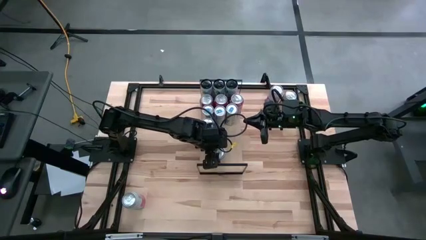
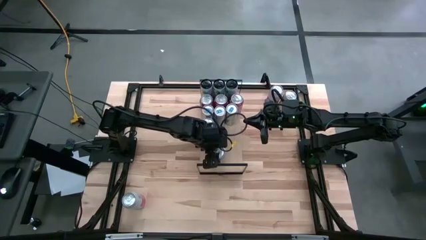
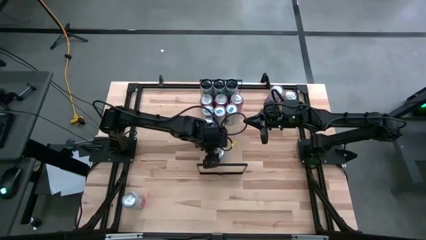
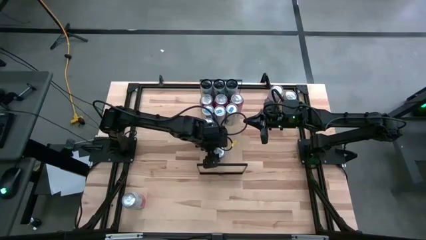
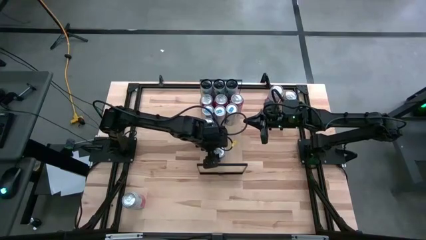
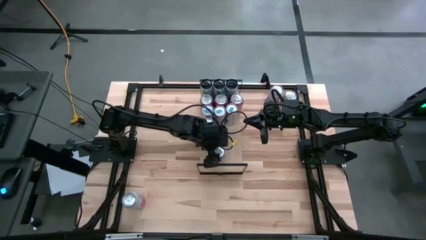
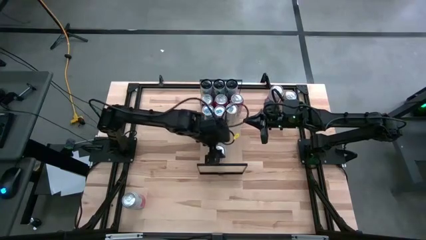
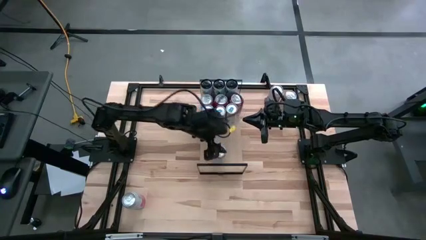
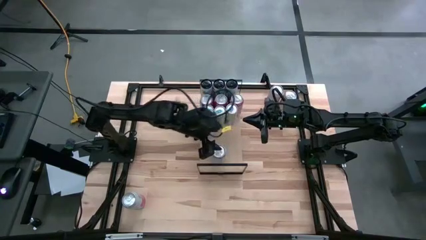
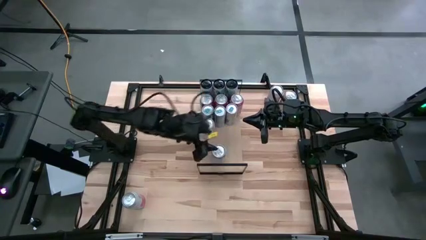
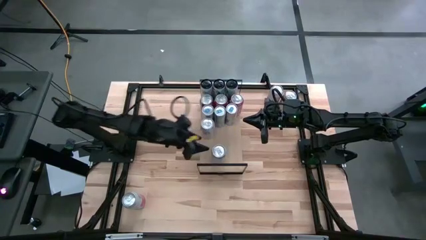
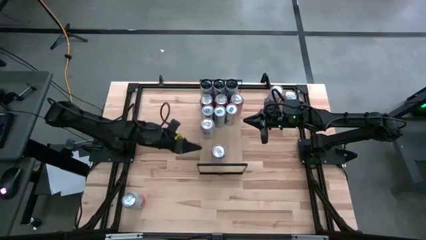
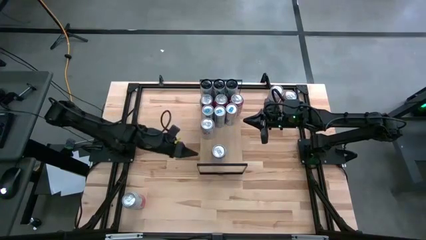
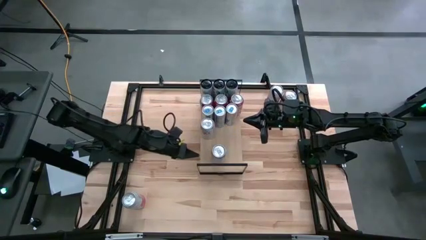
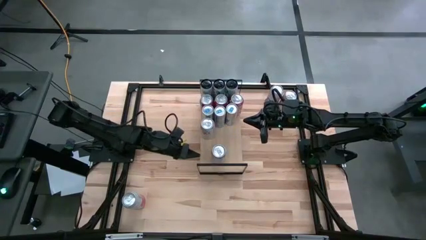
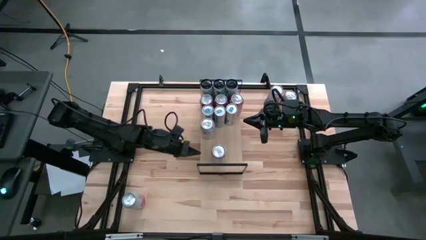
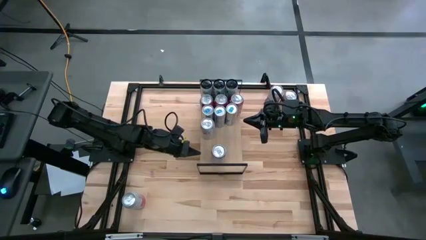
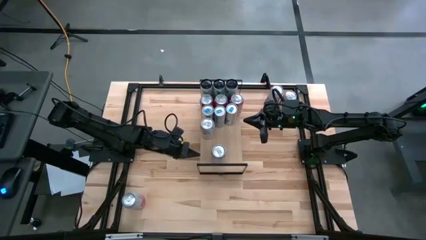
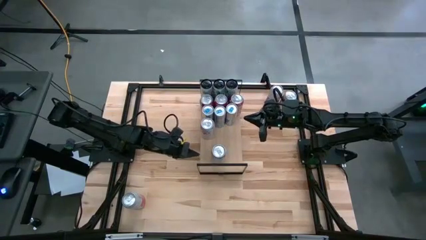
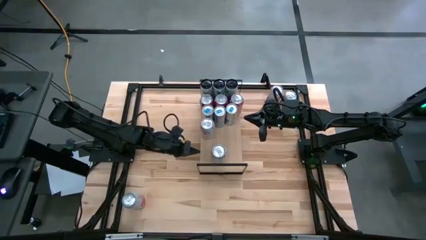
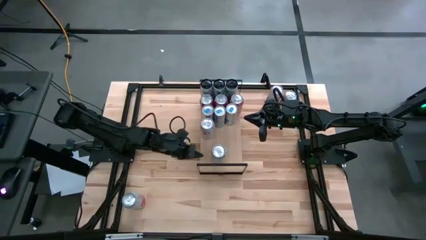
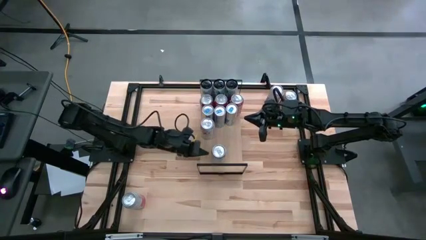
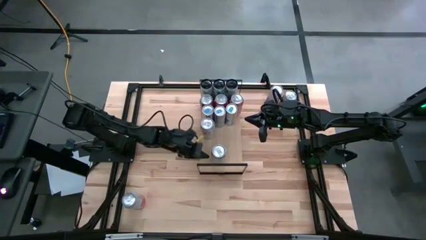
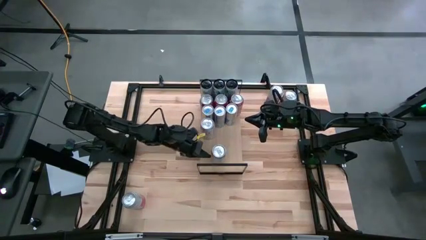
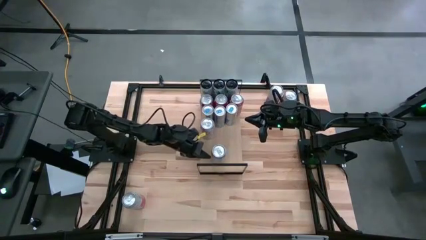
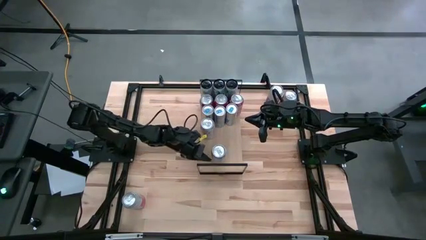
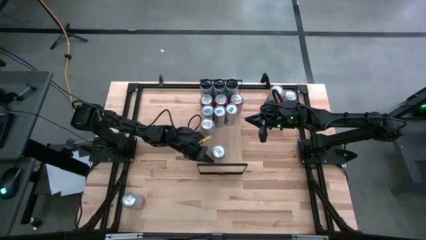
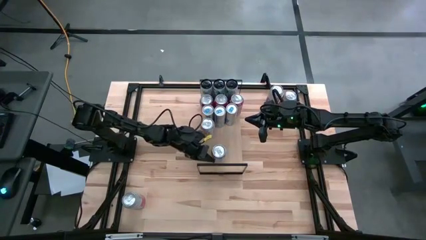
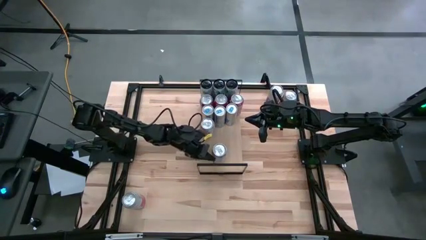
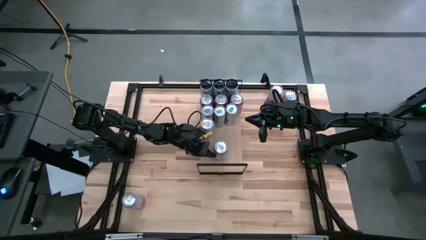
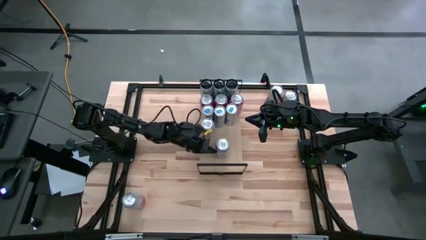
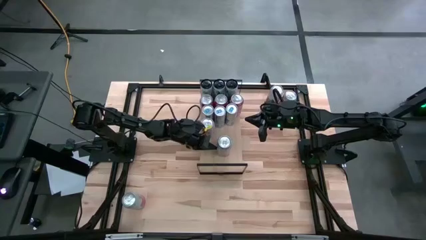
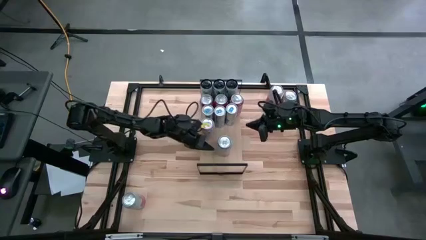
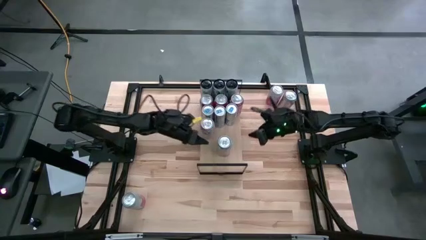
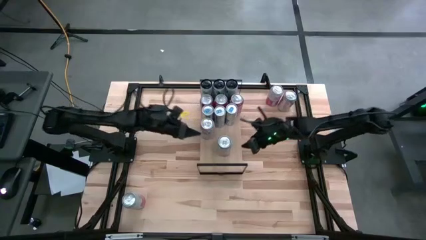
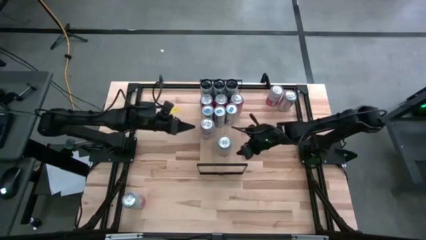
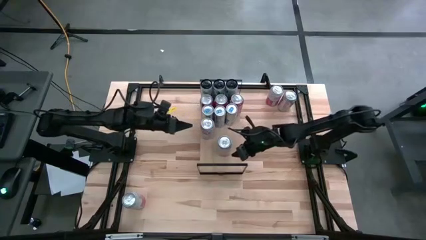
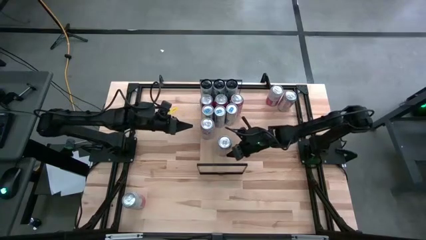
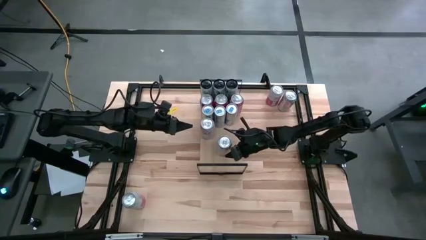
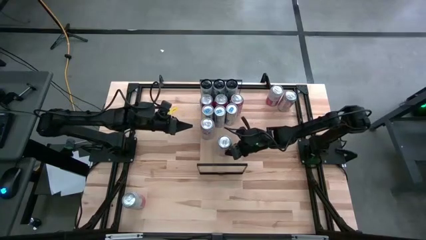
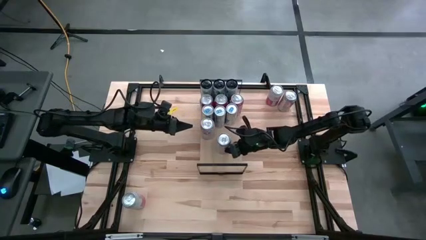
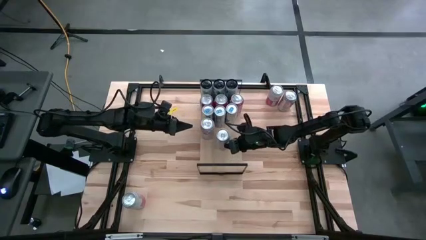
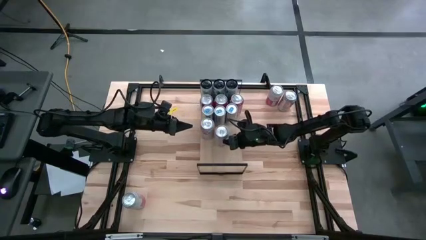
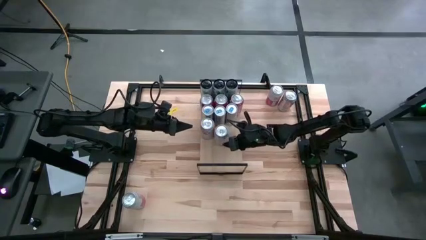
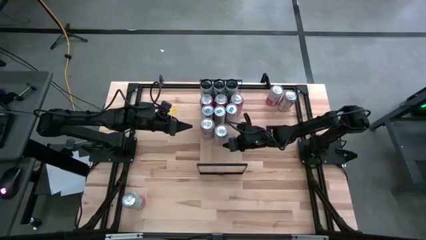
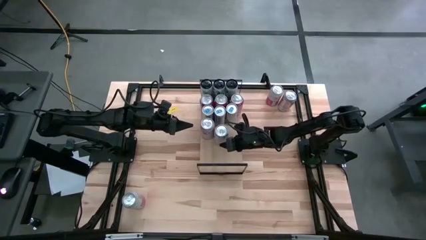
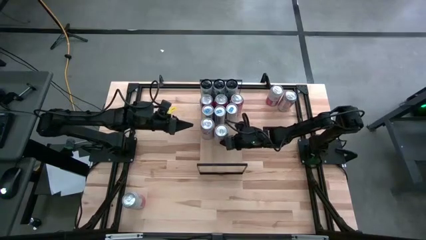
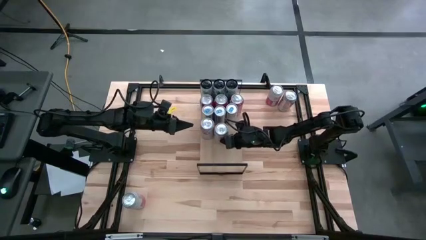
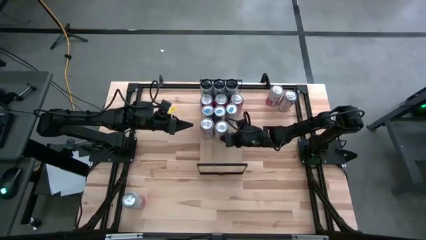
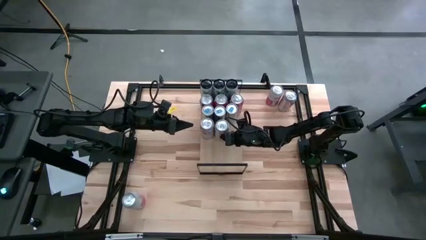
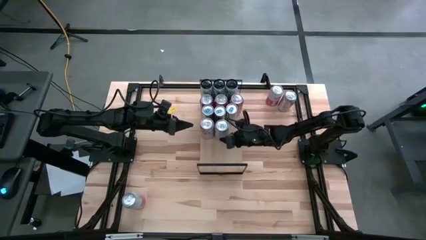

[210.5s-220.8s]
Task: Place canned beverage on shelf
Put the left red-silver soda can on the shelf aligned with the other red-silver soda can

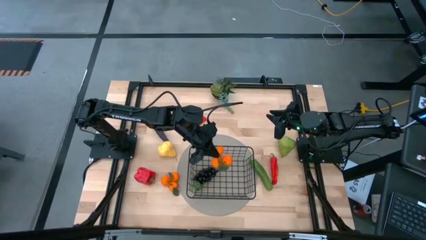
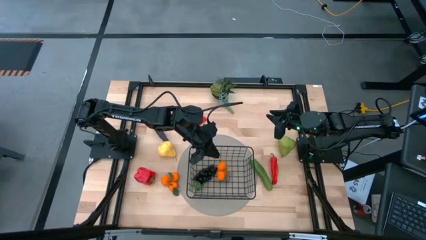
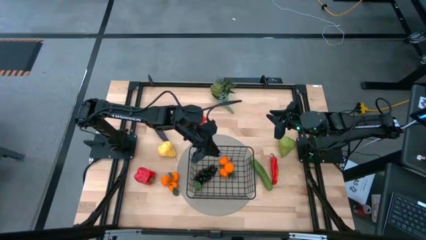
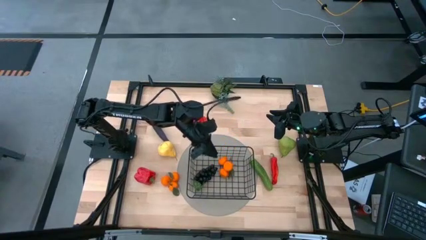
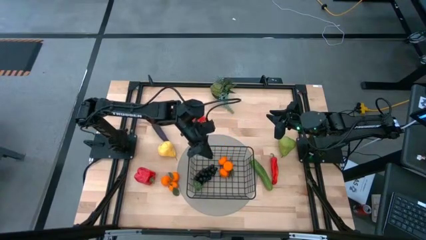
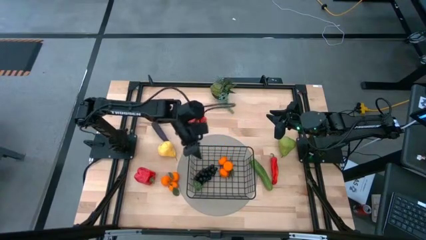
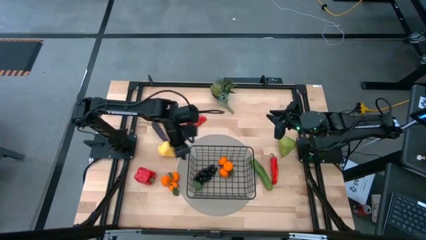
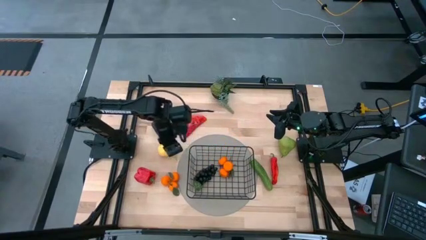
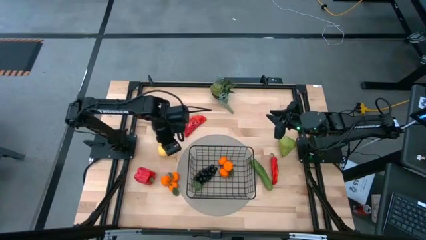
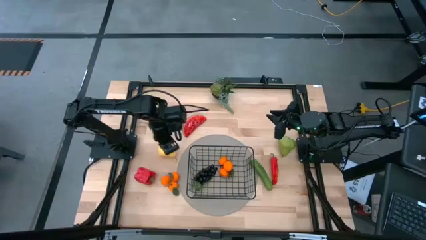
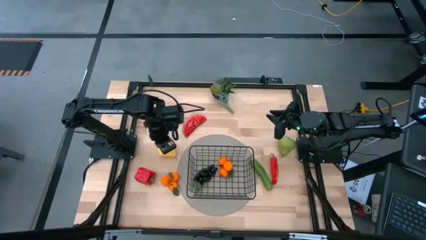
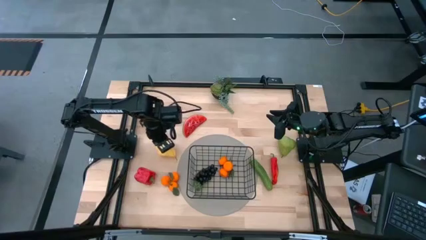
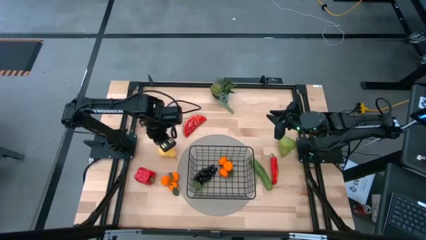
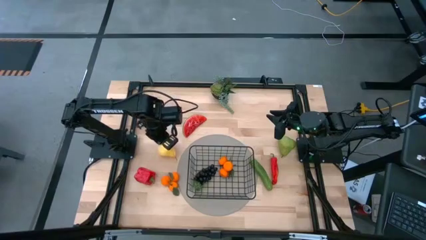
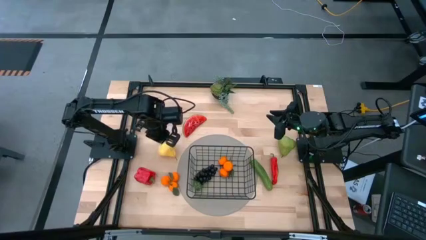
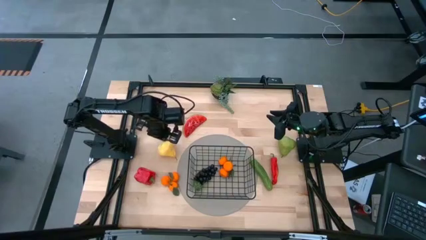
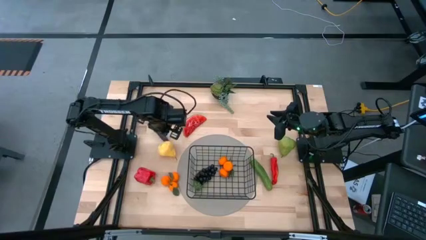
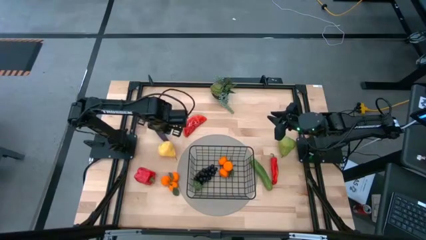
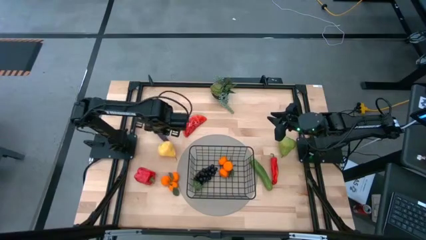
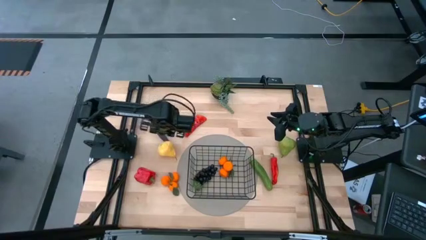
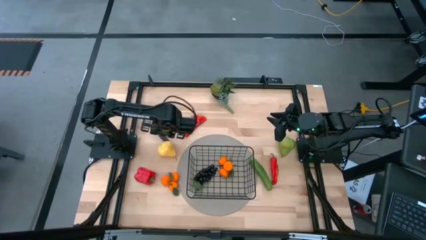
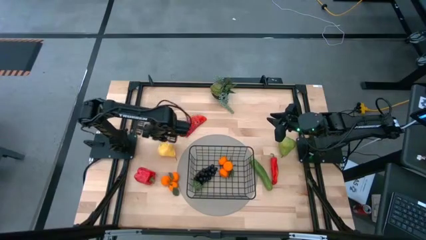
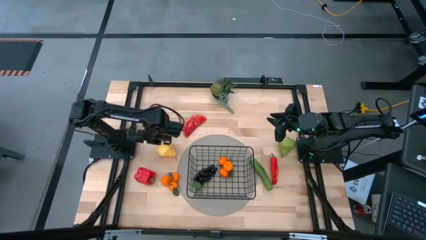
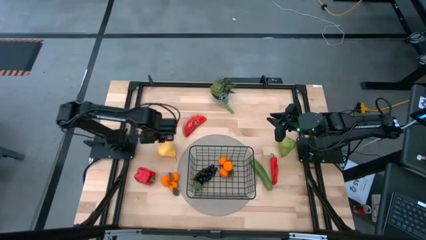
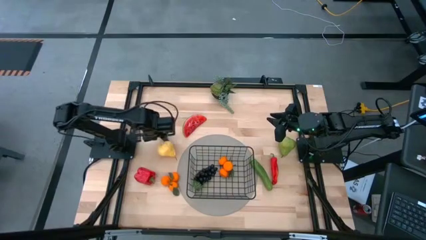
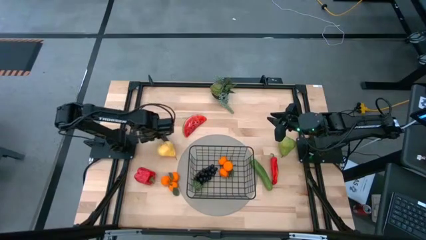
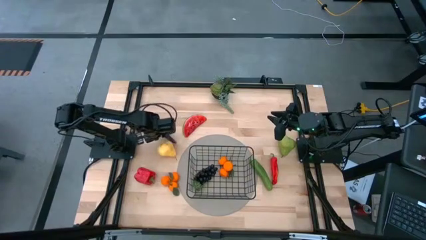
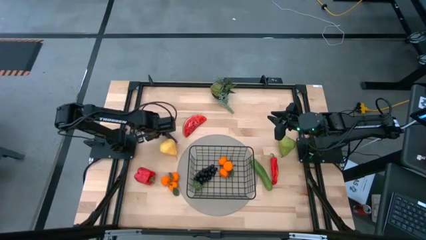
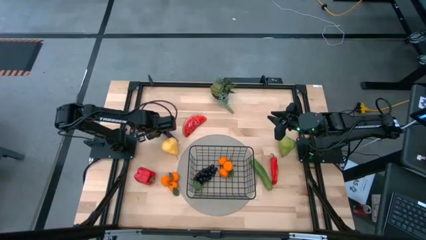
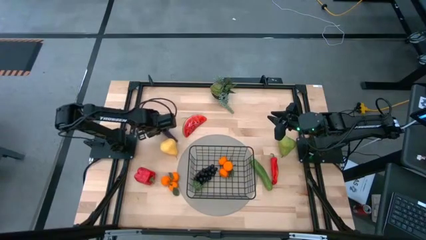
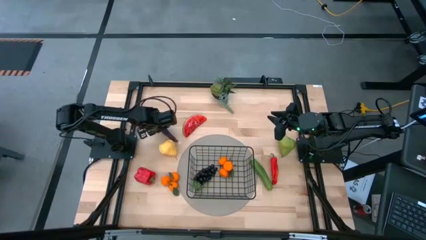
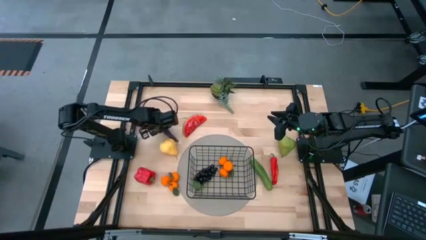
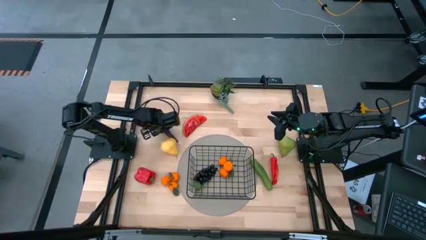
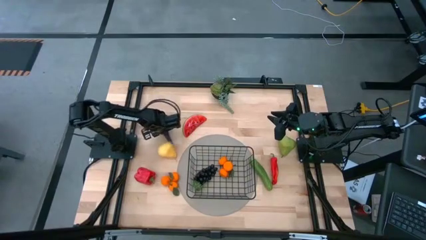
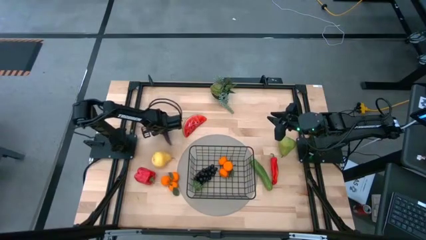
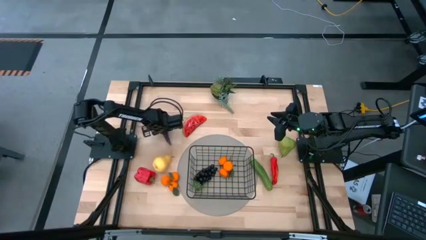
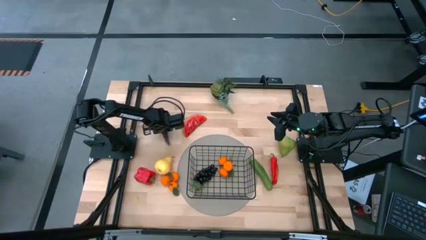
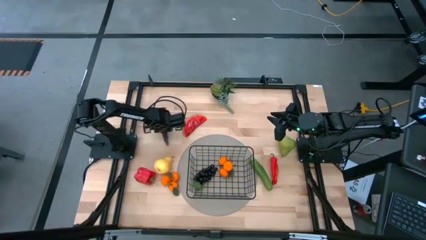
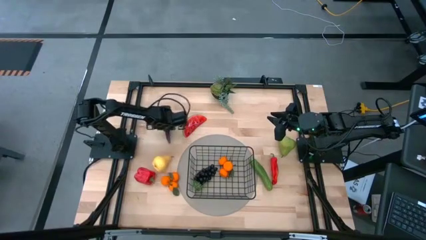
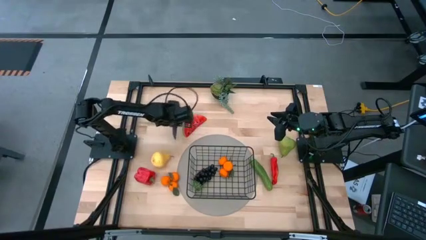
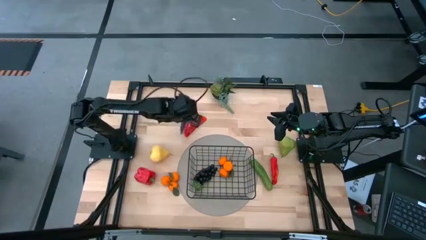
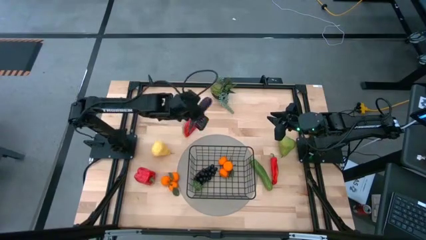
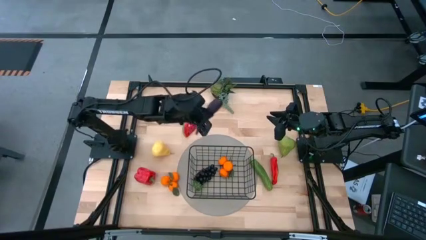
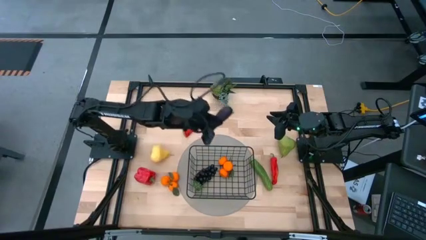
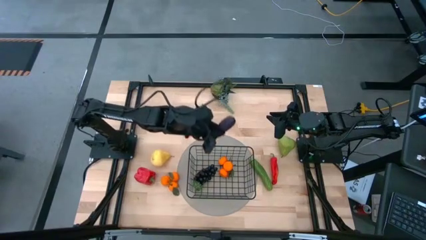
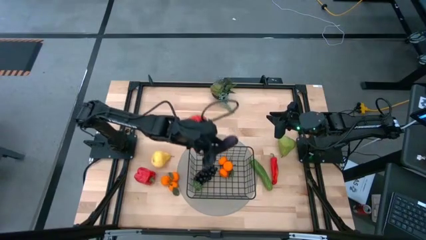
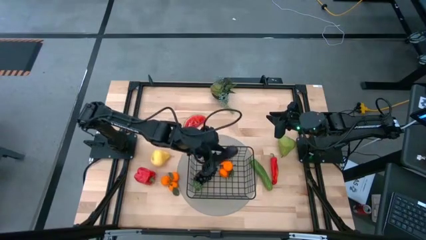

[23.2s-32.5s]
Task: Build produce basket
Put the purple eggplant into the black wire basket
